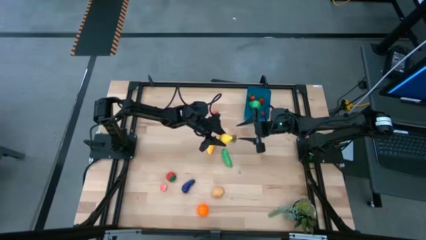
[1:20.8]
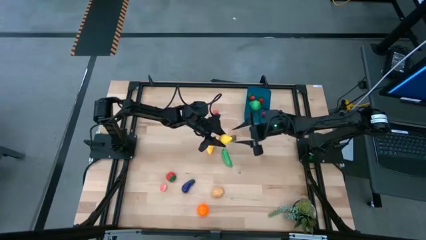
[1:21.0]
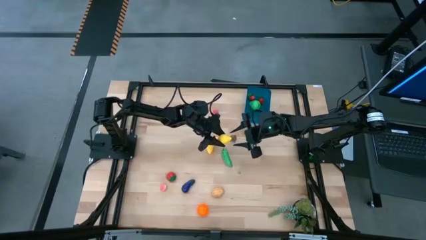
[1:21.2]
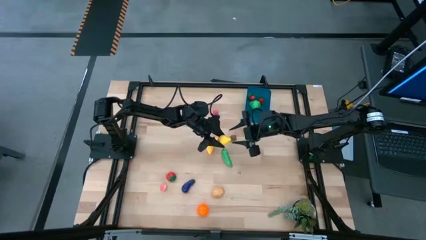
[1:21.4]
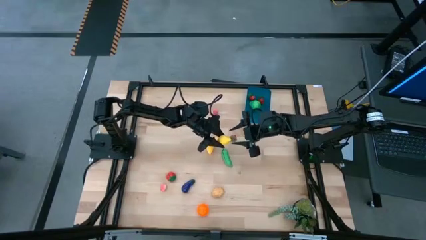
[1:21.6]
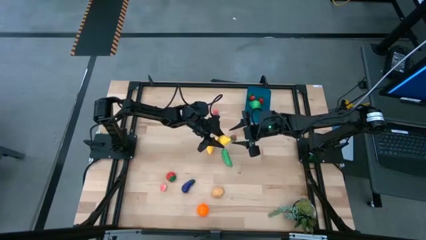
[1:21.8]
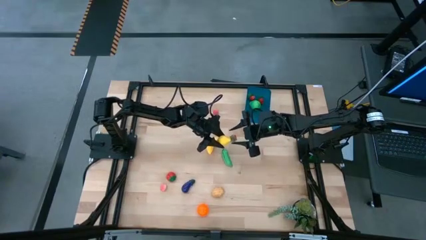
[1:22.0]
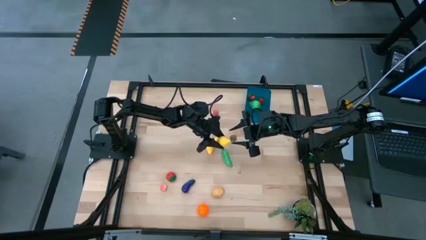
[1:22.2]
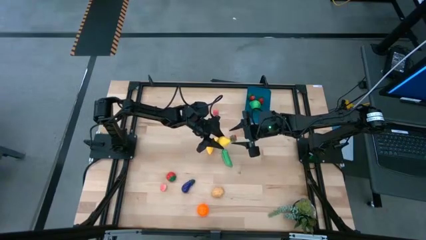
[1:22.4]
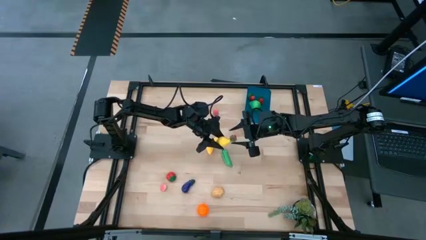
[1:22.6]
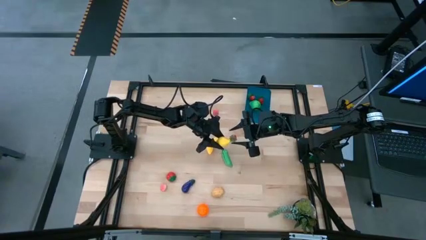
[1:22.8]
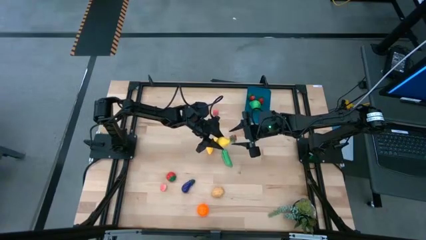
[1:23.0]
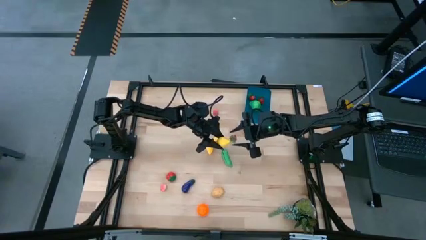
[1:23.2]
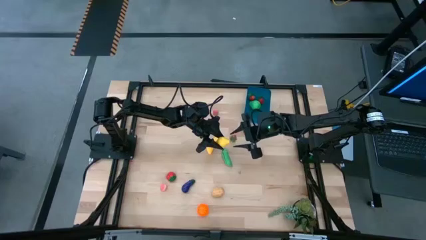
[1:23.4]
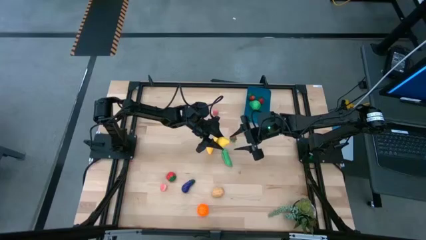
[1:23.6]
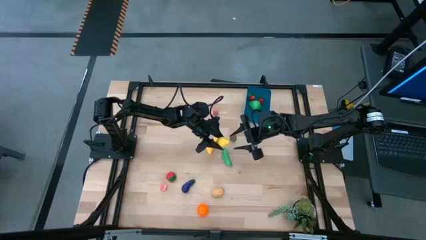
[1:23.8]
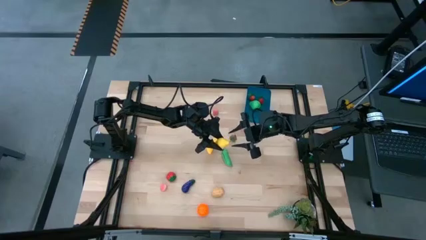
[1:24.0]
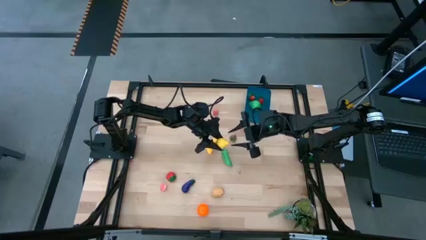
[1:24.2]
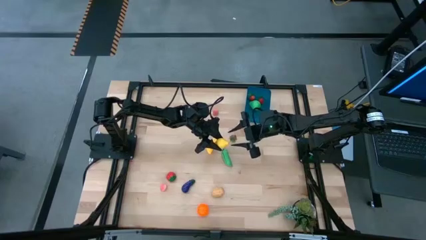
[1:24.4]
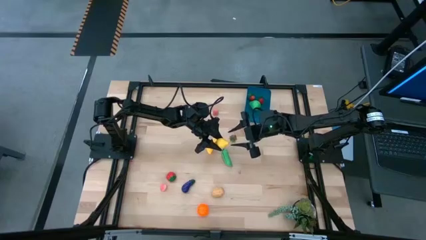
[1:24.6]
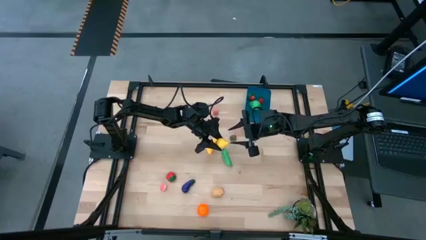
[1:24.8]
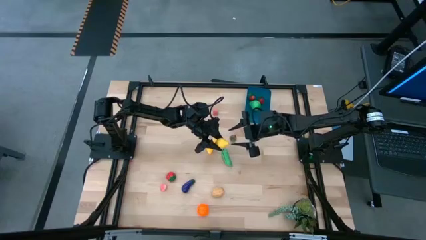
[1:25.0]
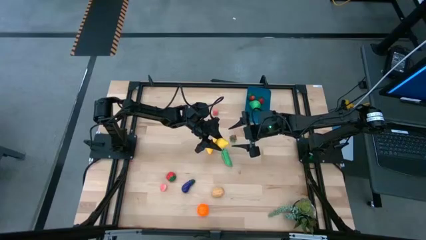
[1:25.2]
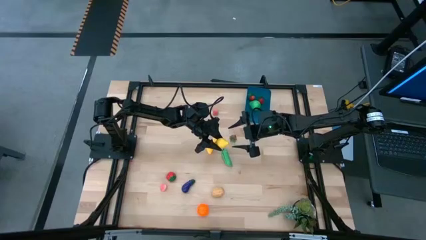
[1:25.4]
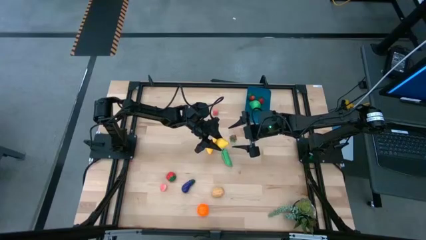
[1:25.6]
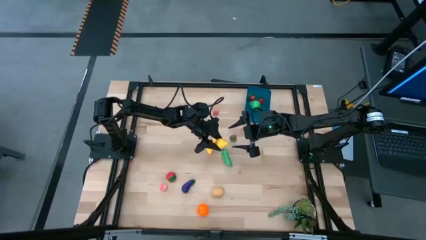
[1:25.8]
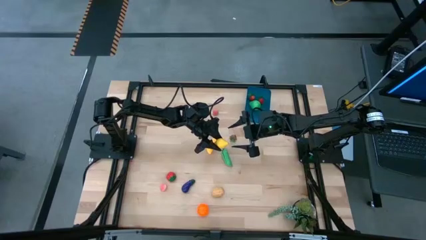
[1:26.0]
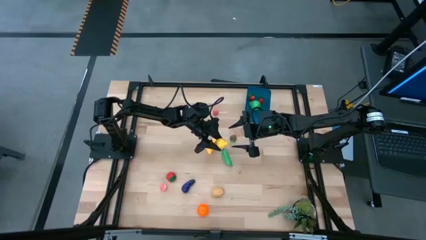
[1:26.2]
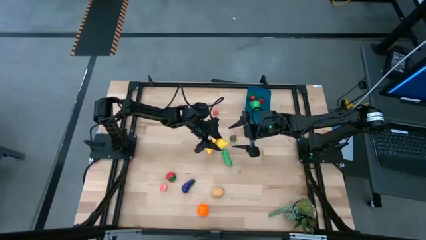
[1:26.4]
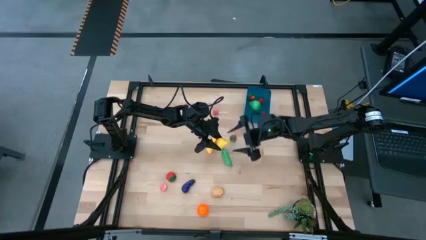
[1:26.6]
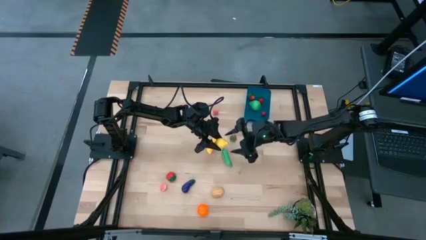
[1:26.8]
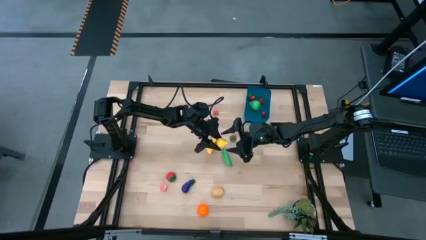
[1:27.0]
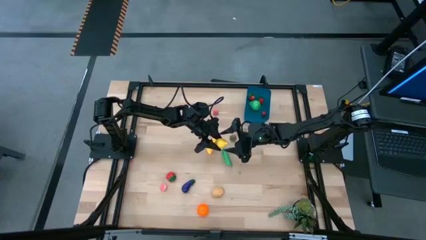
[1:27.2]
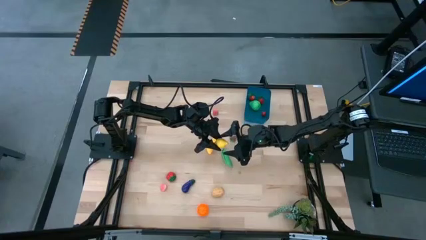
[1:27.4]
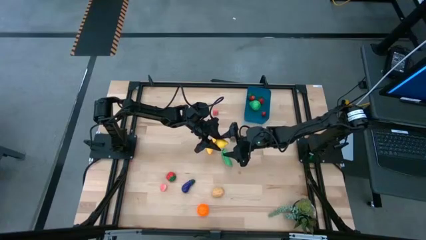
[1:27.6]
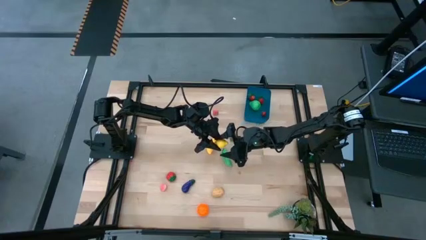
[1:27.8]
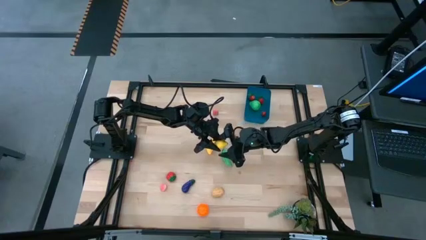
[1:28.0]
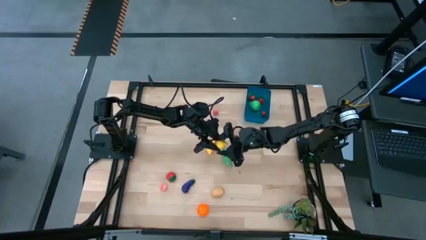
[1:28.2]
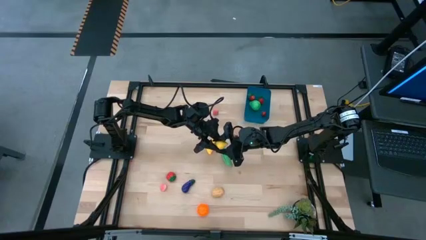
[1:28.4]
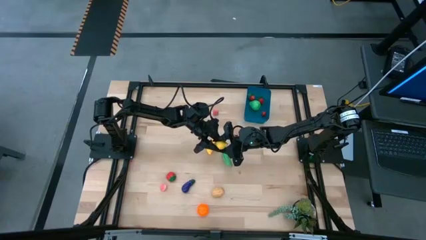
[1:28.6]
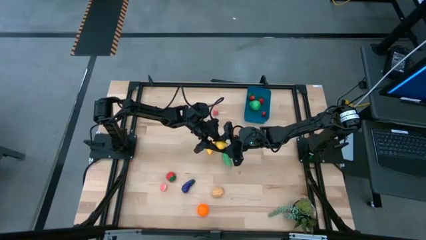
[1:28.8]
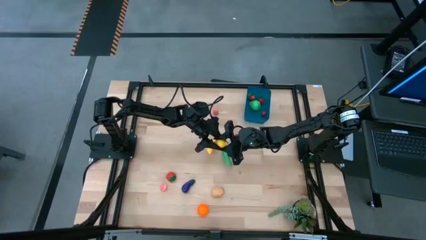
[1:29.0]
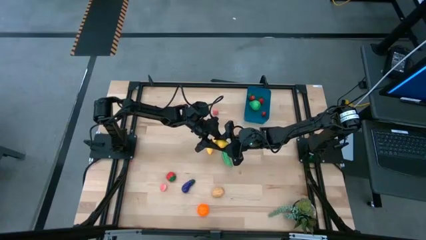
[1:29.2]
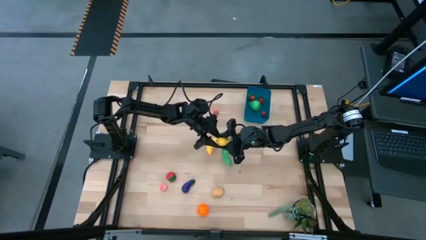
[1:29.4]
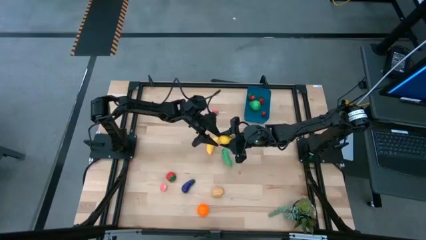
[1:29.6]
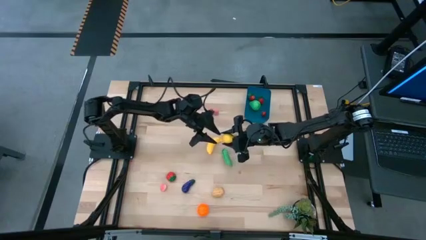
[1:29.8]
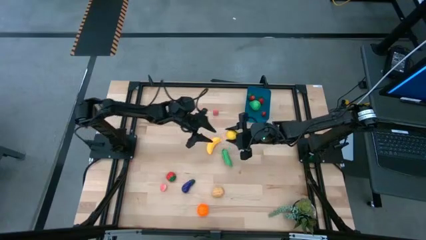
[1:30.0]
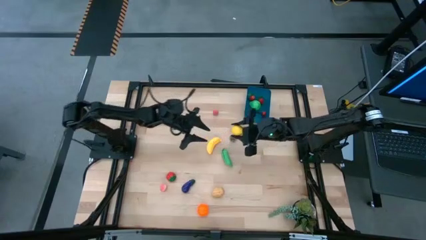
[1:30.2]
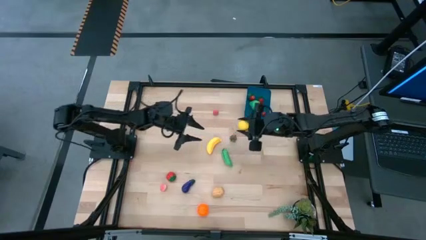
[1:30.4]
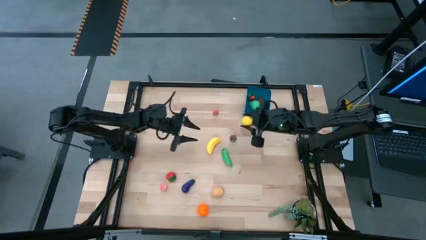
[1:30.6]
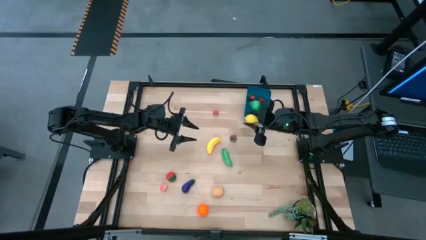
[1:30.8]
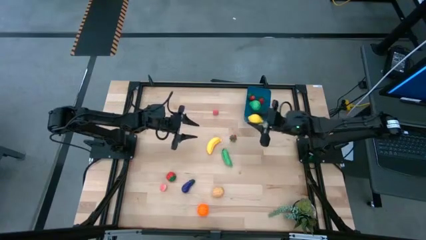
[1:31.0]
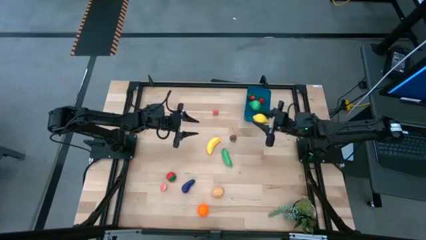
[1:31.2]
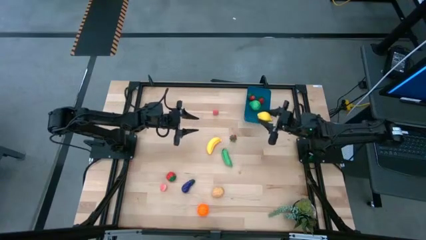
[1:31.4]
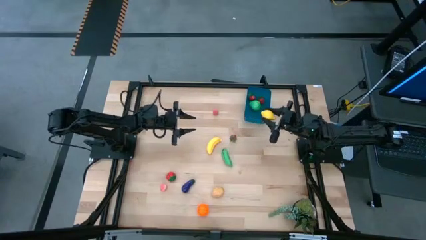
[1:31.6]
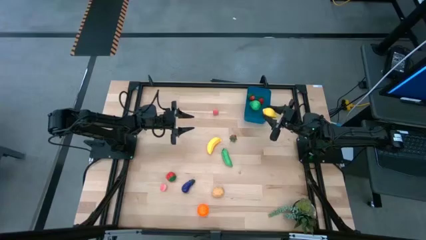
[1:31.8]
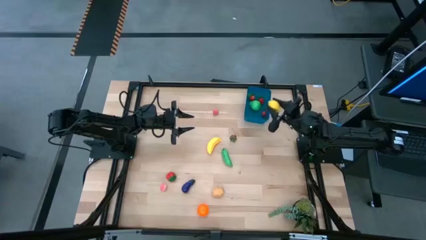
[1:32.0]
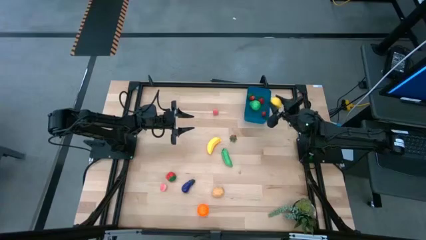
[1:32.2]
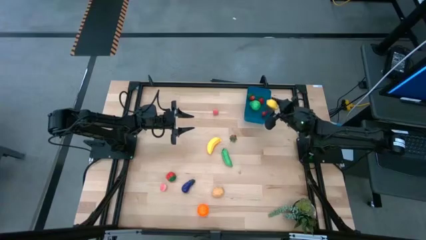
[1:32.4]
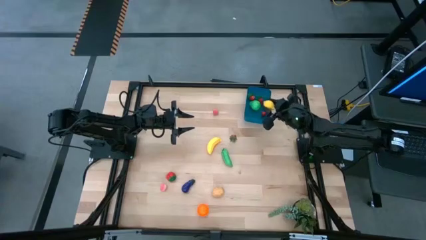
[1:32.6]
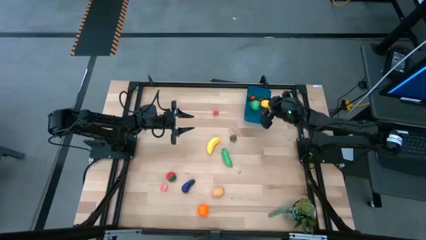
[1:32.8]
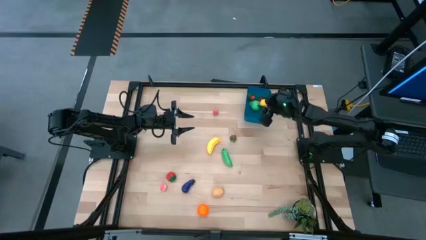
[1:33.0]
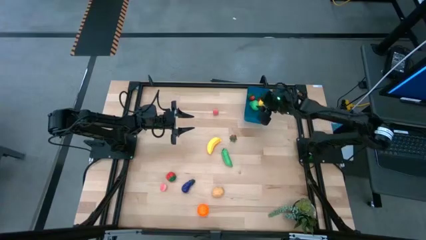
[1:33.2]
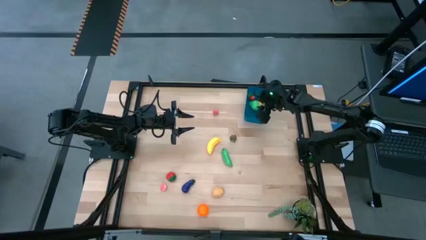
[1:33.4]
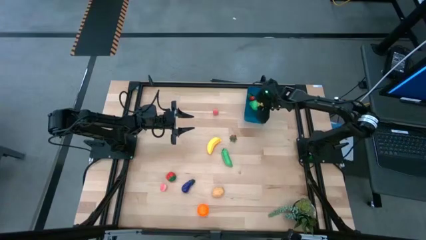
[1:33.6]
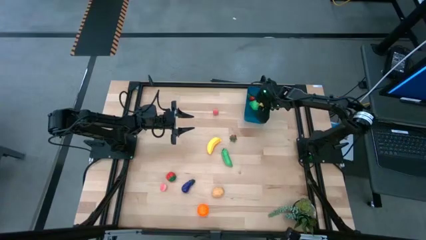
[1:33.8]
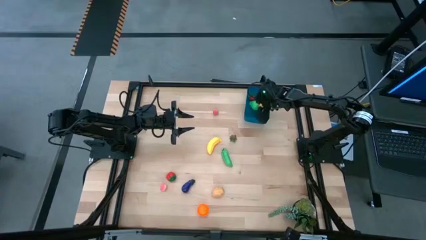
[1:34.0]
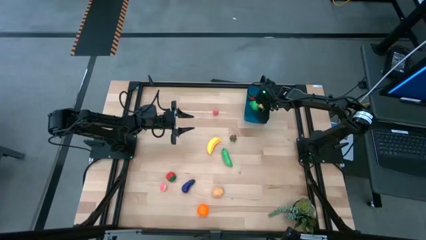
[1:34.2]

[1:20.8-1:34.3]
Task: Pick and placing Produce into tupperware
Put the yellow lemon into the blue bin

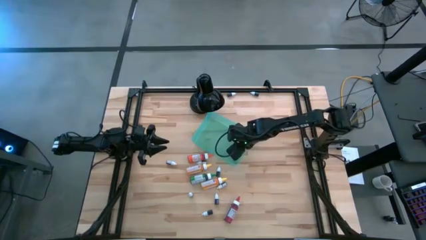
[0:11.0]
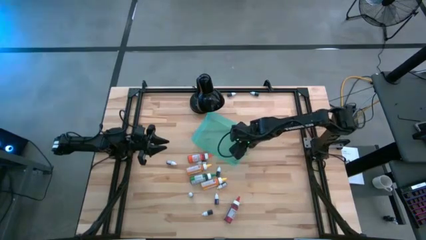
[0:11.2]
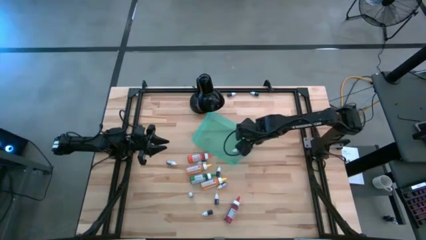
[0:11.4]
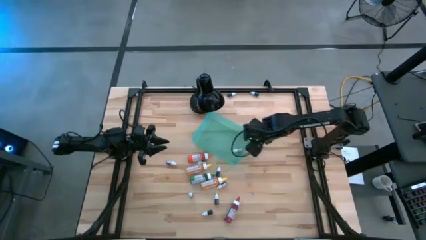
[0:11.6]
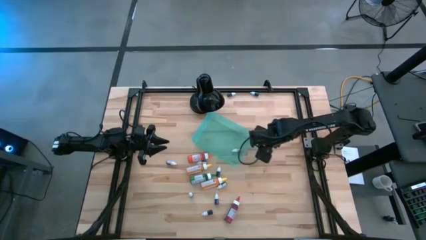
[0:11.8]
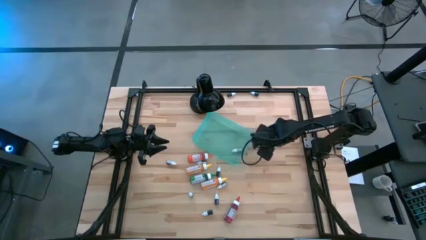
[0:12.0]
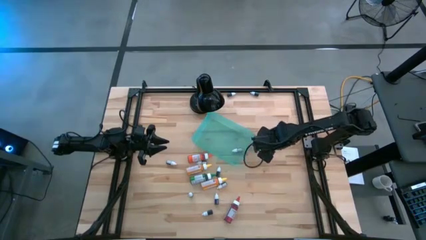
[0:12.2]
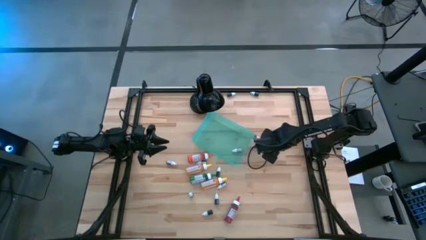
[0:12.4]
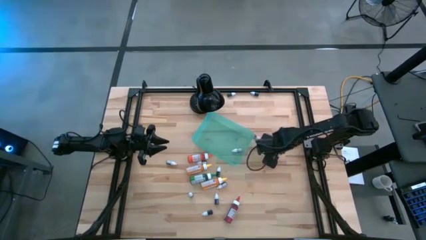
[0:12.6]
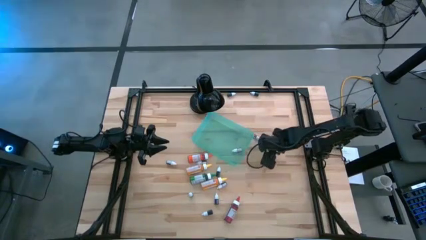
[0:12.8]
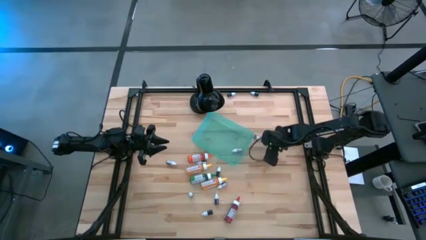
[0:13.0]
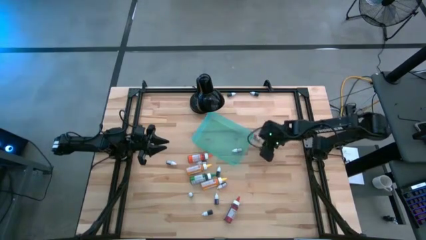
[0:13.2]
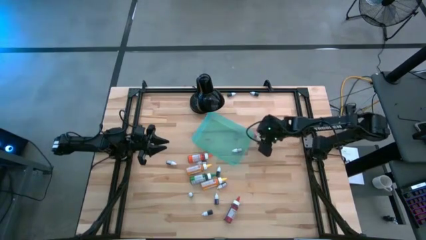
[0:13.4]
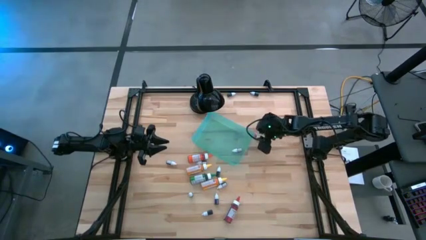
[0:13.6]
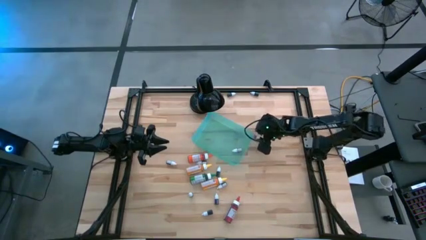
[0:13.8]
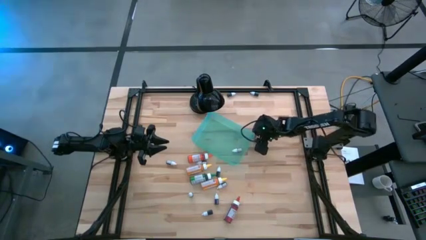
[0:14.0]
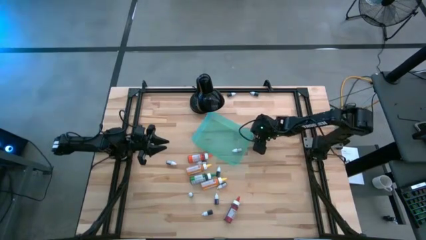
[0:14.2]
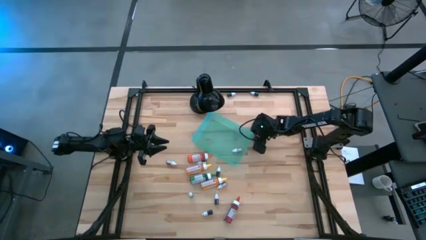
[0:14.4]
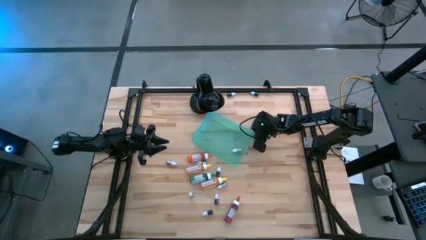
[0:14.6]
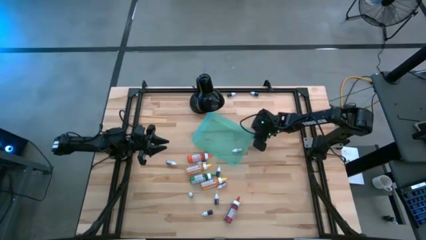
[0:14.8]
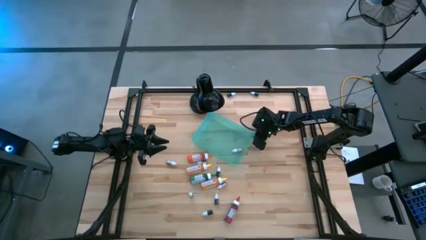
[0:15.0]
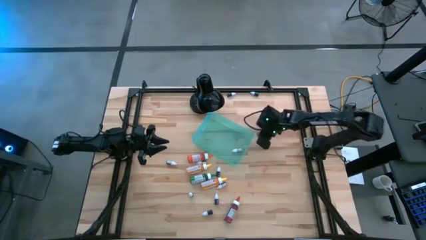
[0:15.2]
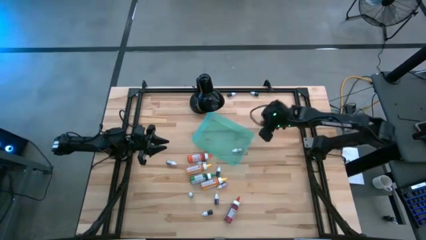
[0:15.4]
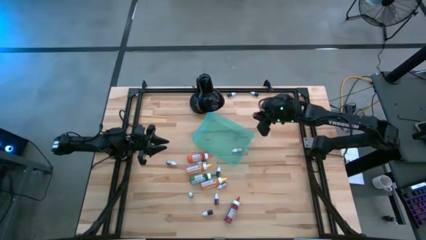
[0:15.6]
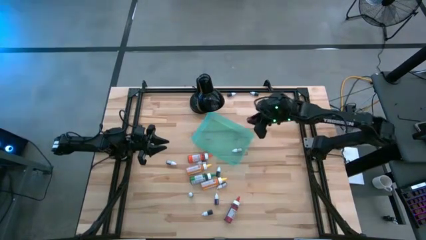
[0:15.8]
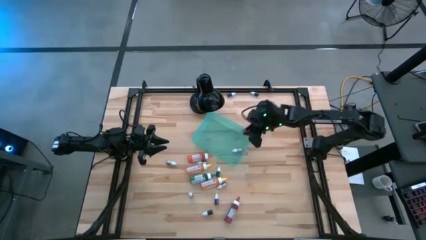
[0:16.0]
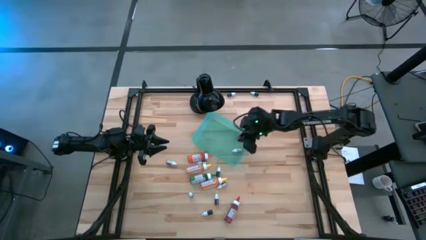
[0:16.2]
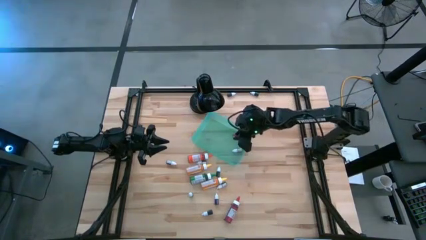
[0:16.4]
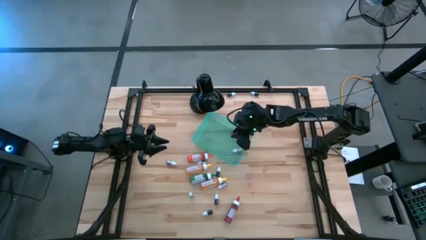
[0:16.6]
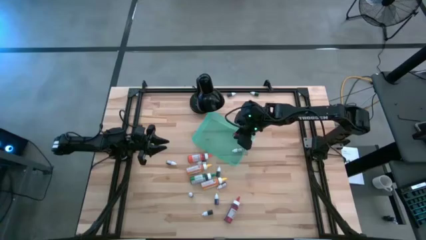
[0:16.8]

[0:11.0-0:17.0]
Task: Pick & Place food coloring
Put the small red food coloring bottle into the green bin
